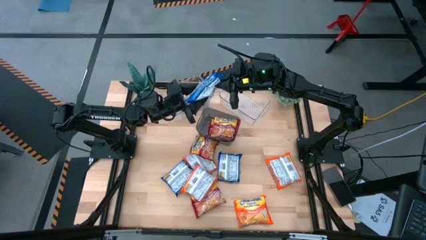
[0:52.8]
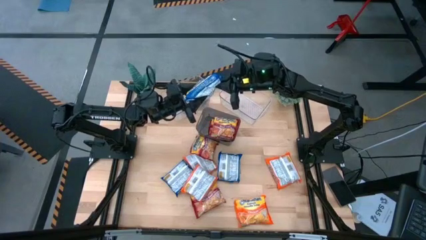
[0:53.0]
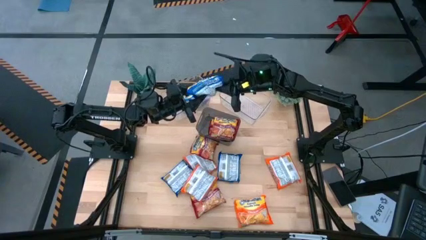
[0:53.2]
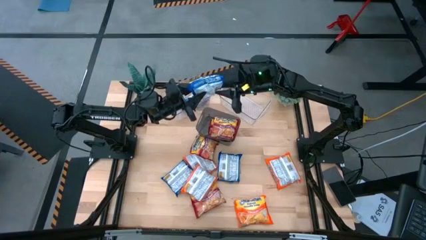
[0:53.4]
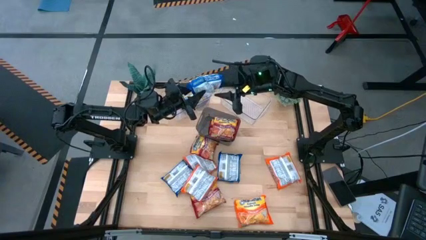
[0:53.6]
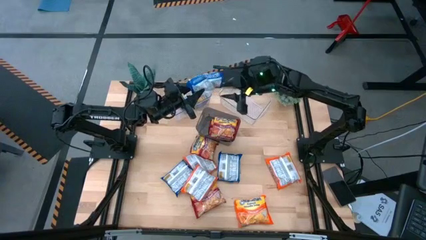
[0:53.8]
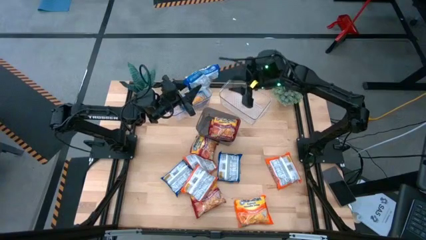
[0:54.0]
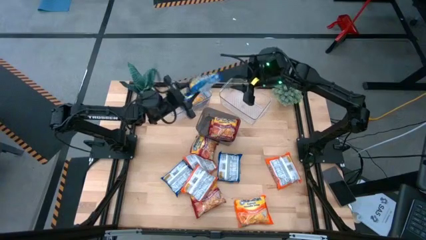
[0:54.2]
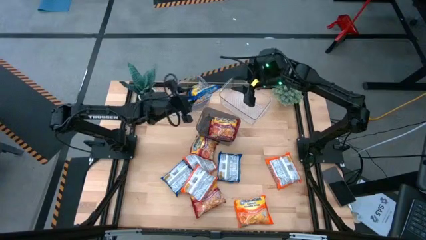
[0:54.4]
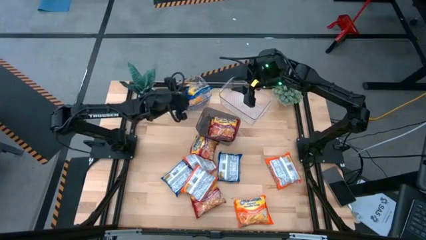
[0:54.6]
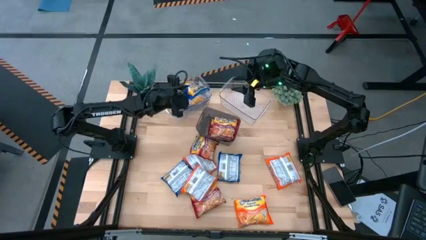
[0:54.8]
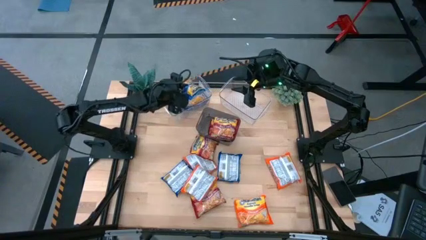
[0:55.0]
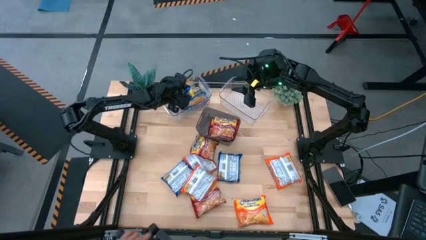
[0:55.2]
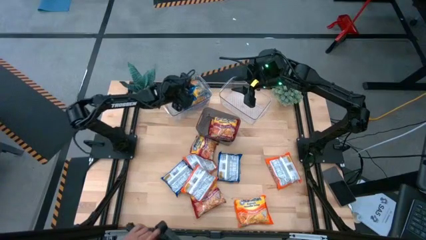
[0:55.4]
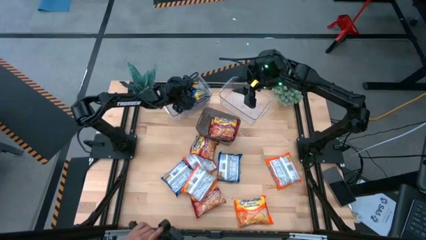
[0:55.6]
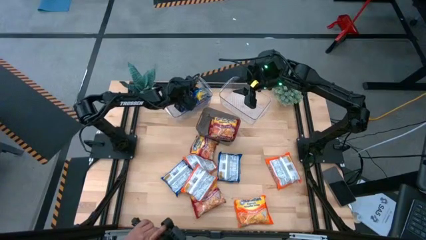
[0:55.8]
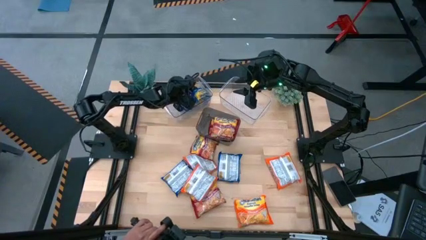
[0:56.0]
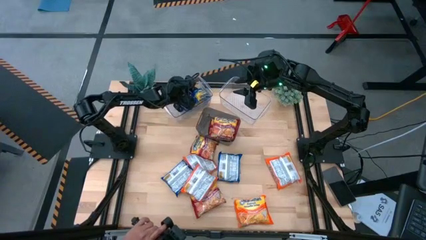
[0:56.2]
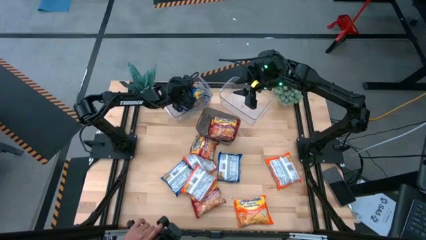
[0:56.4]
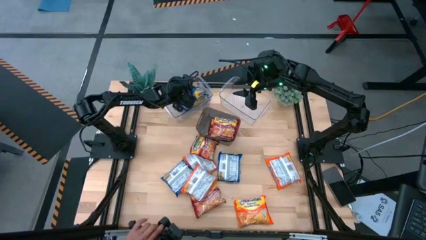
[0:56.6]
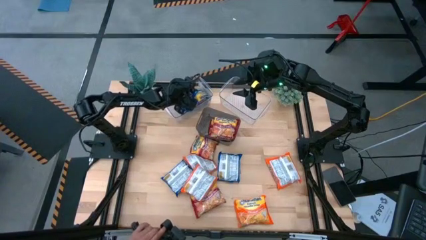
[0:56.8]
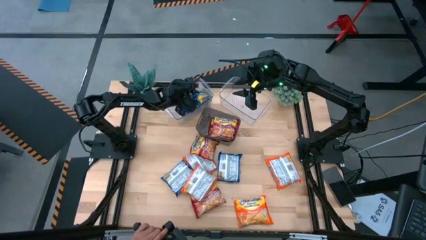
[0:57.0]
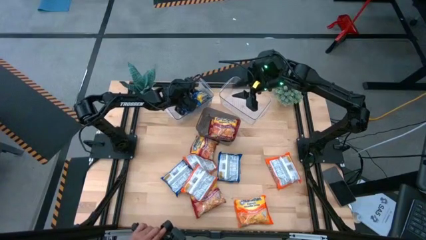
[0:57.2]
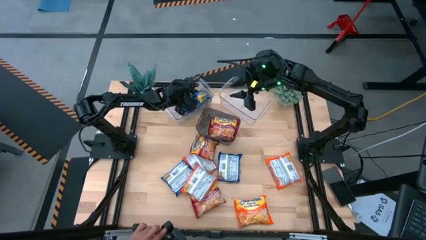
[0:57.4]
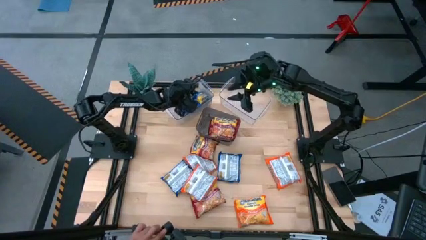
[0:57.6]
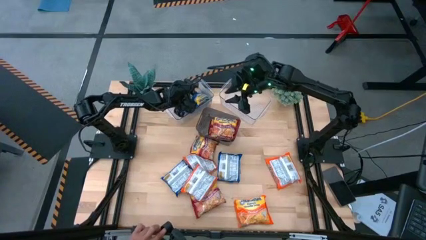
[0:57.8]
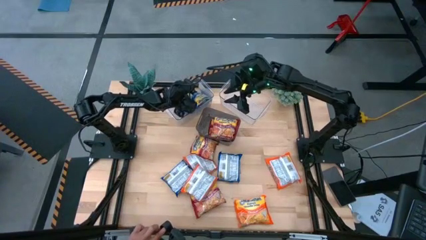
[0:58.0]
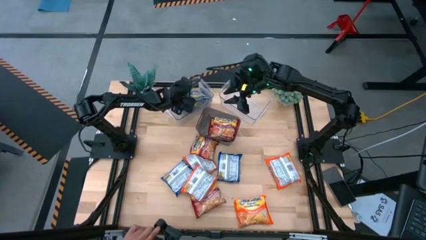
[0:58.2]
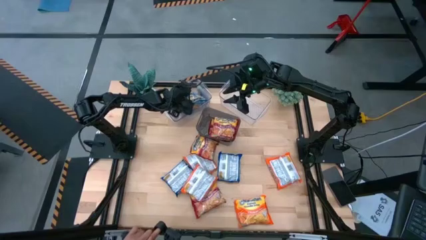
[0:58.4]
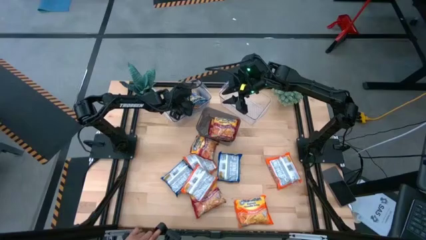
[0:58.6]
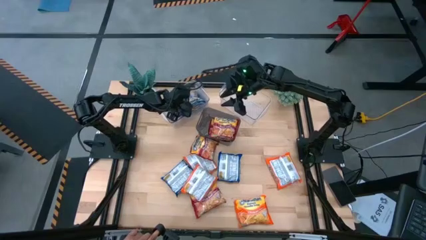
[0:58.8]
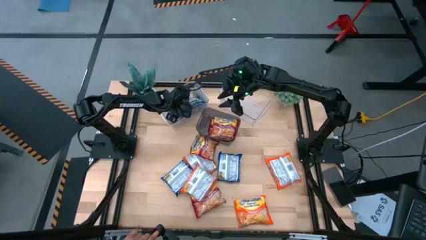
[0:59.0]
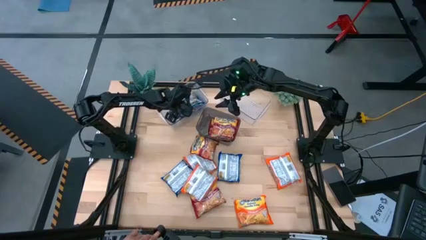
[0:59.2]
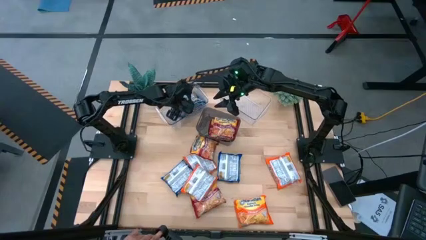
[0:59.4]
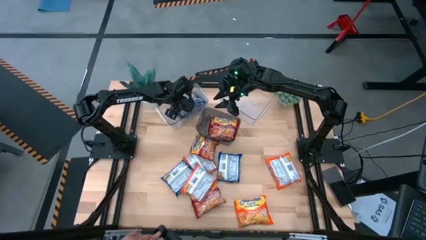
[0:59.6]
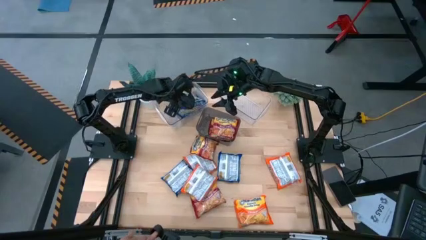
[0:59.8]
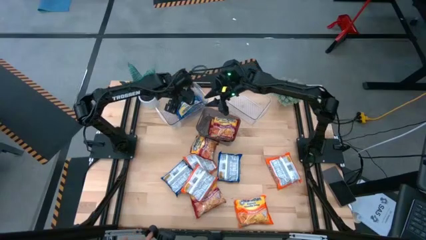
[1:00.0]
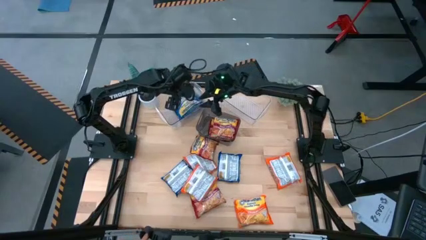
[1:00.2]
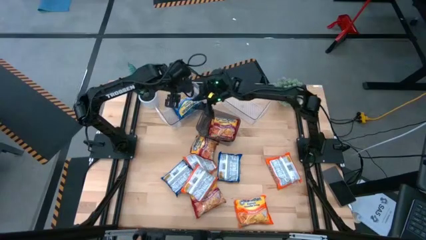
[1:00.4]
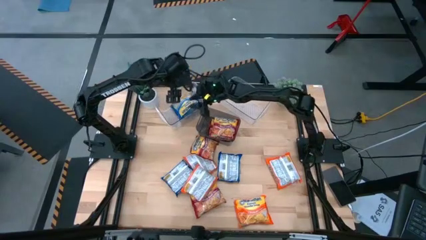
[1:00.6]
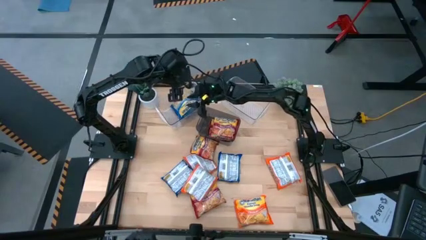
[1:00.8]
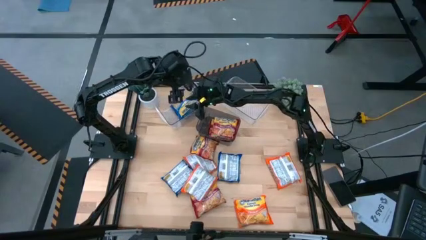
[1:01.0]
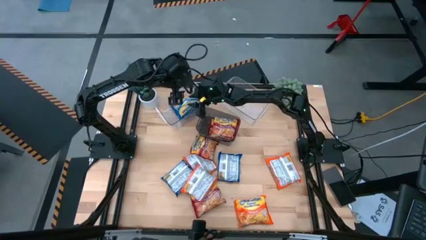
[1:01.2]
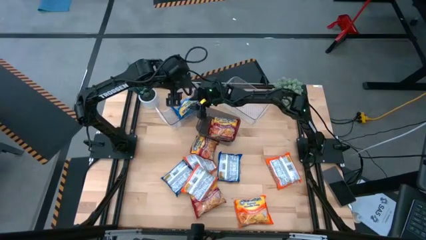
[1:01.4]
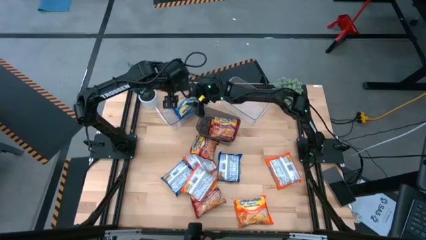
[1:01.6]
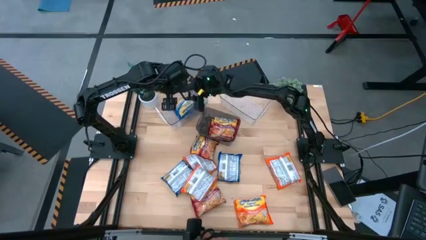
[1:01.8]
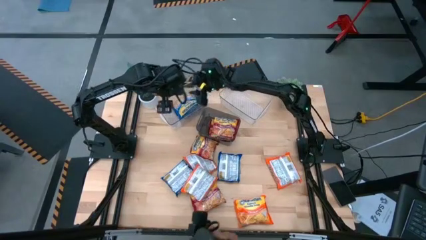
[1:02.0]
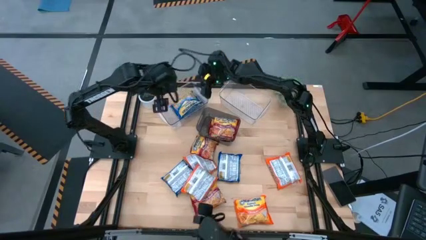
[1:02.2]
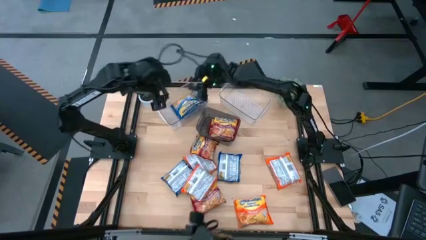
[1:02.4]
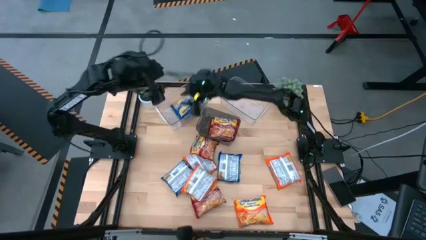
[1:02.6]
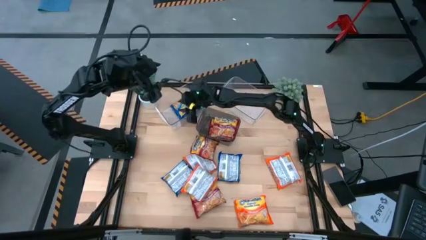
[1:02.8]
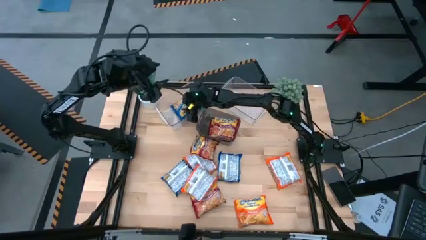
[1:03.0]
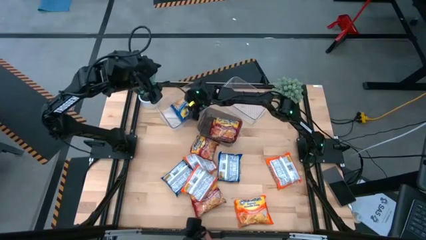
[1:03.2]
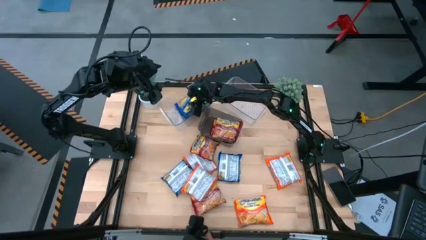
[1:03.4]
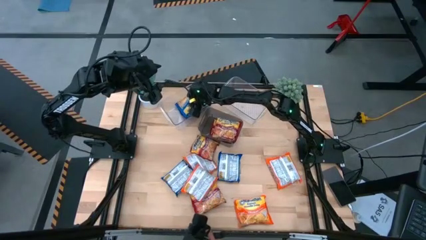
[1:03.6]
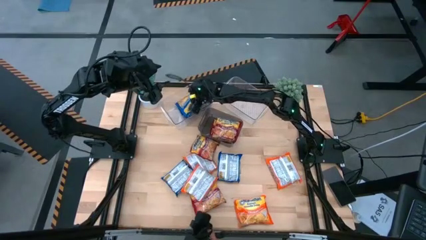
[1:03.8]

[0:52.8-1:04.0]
Task: Sort Maruchan noodles
Stack the blue noodle pack on top of the blue noodle pack

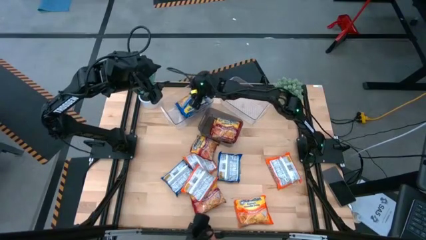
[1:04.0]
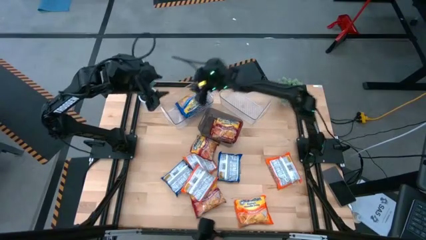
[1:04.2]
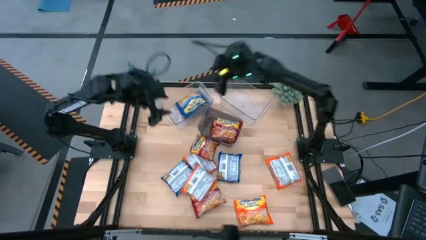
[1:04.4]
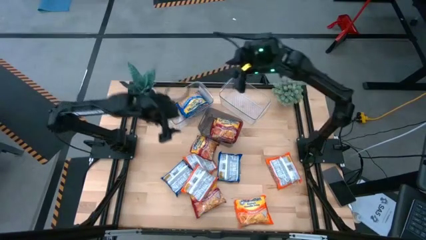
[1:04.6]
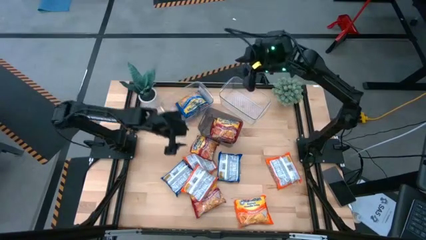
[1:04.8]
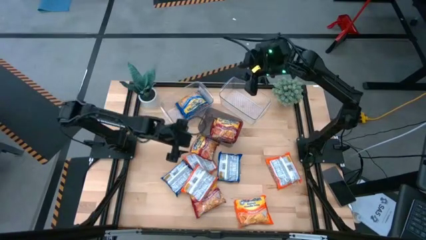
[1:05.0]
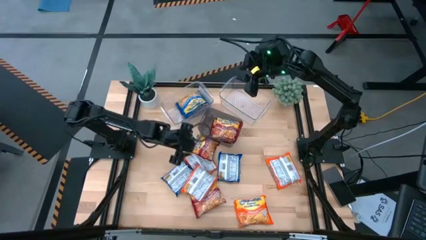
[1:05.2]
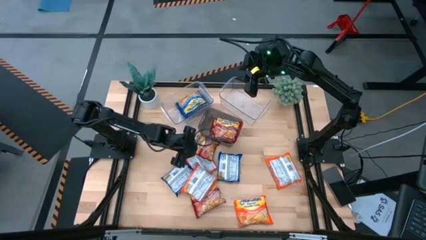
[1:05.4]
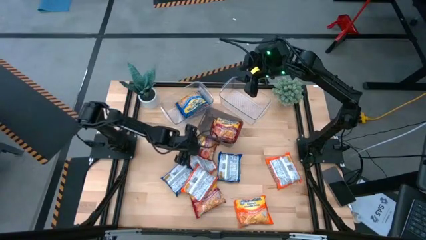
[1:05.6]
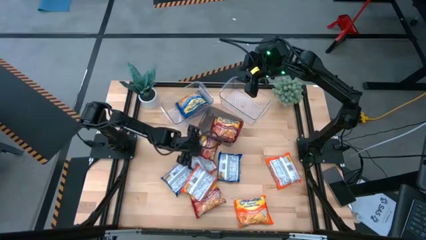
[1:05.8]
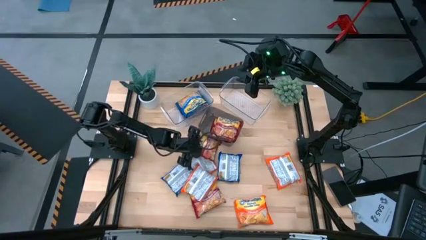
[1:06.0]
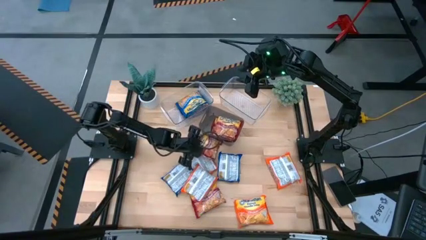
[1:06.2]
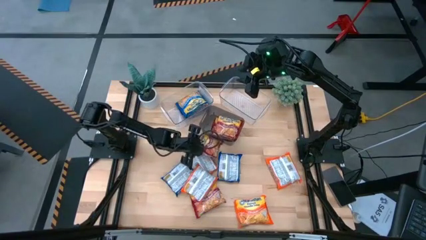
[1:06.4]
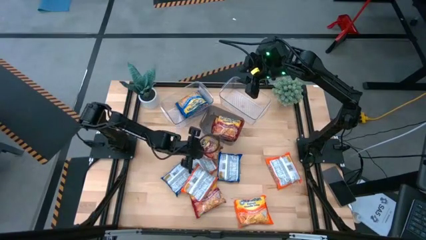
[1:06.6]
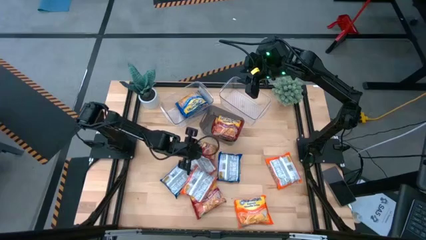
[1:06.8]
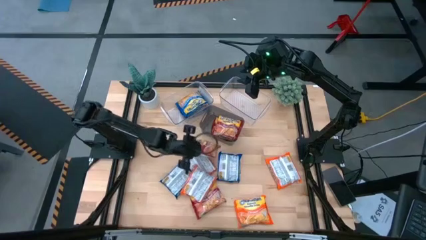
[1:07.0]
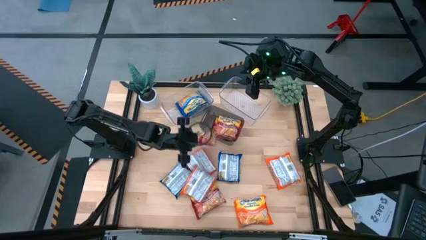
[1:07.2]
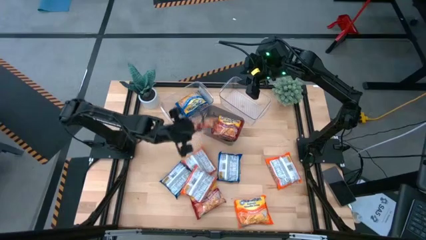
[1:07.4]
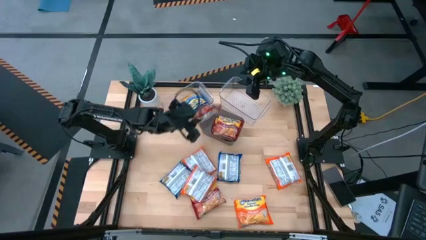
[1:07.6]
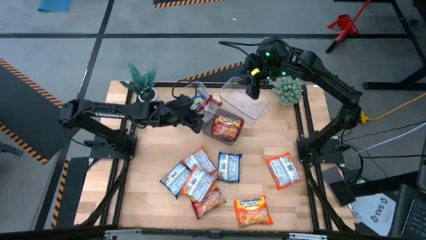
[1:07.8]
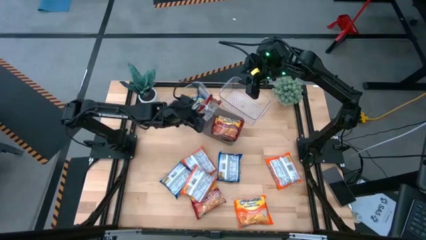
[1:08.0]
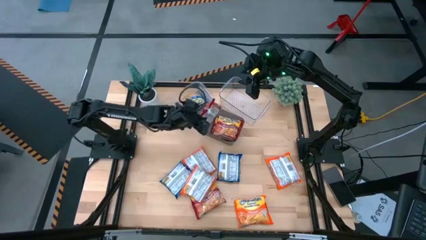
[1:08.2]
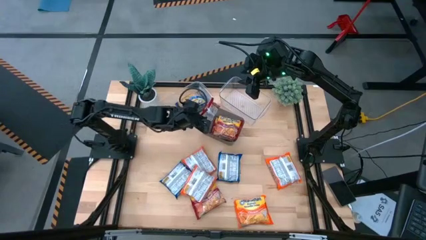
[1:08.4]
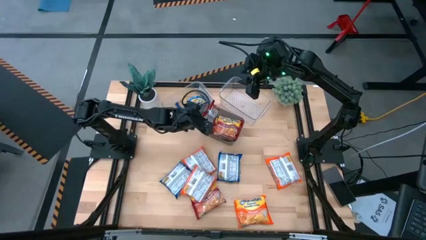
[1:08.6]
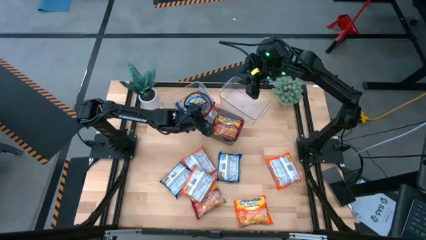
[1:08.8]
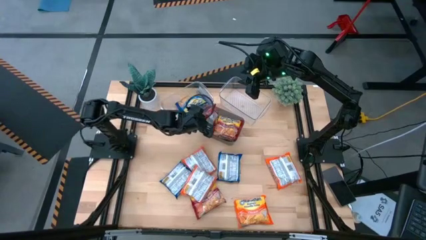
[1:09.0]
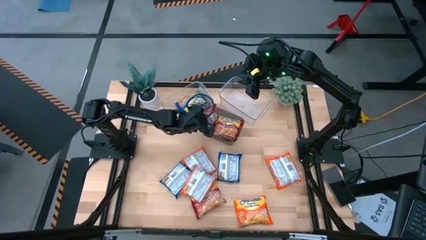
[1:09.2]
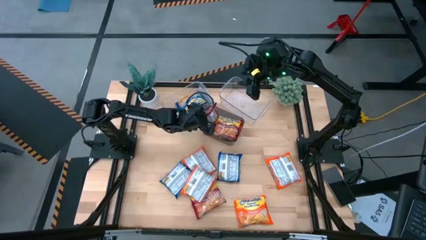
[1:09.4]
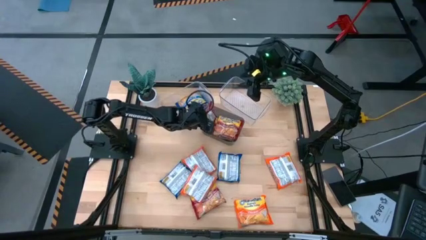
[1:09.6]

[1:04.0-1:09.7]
Put the red noodle pack into the gray bin
